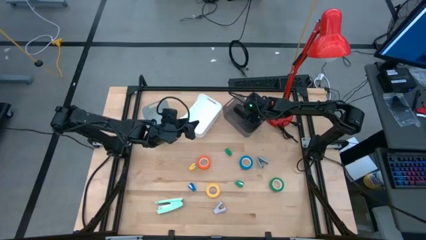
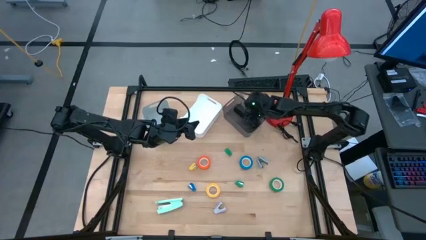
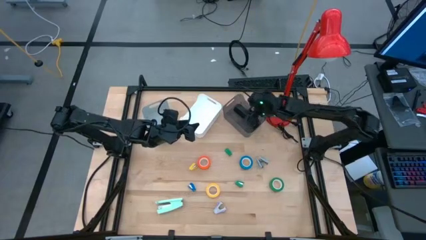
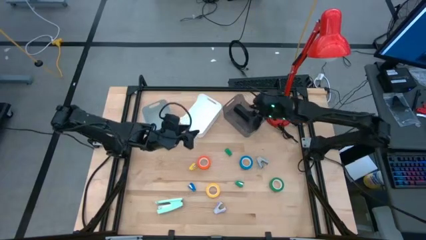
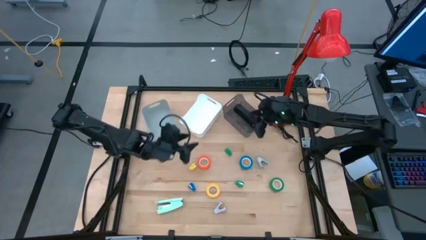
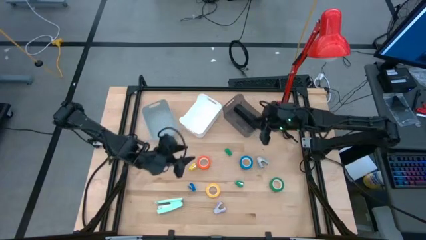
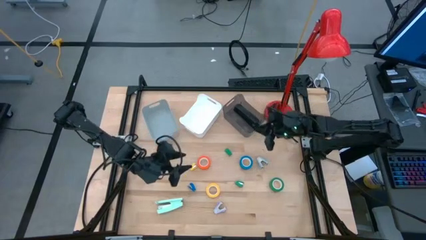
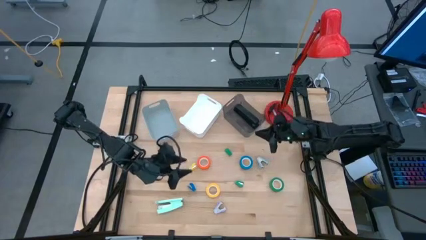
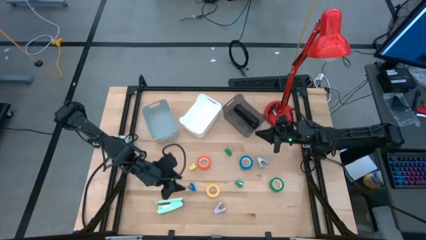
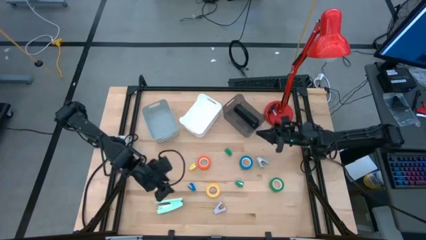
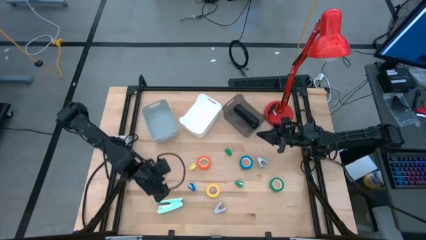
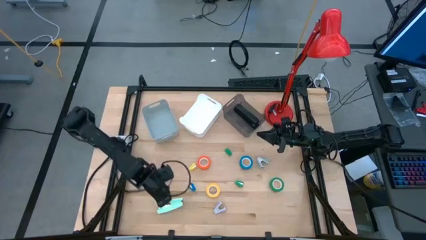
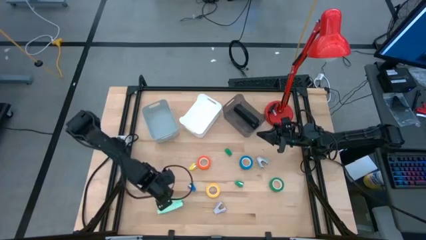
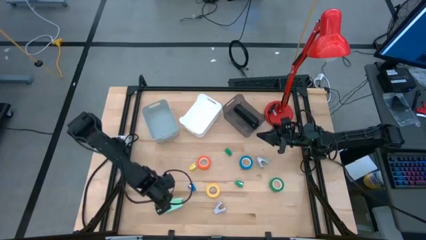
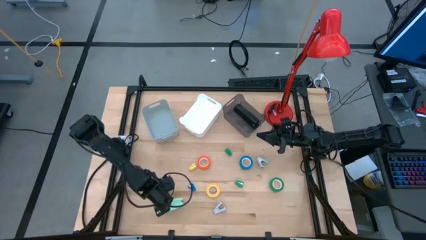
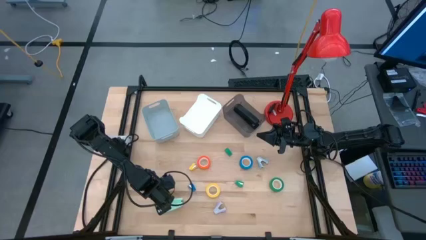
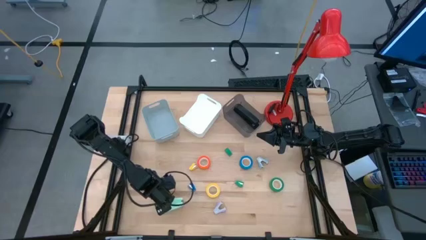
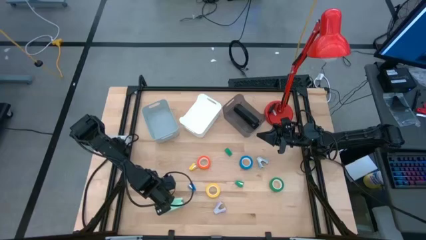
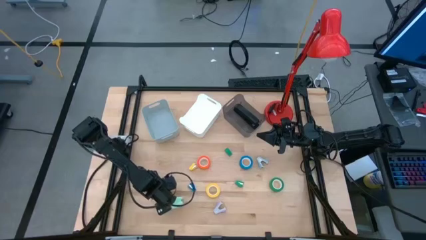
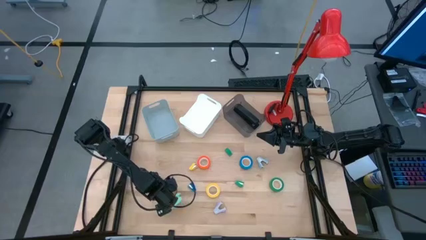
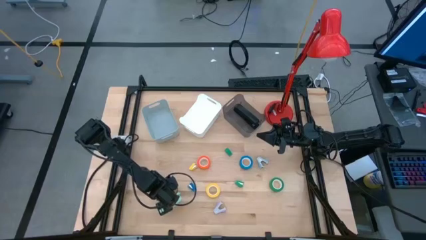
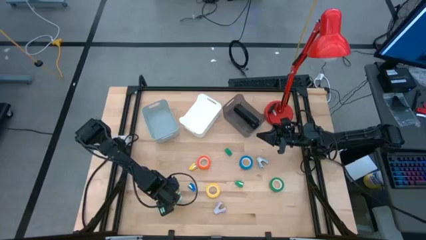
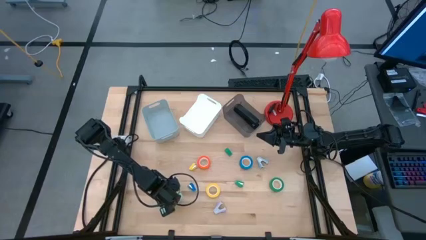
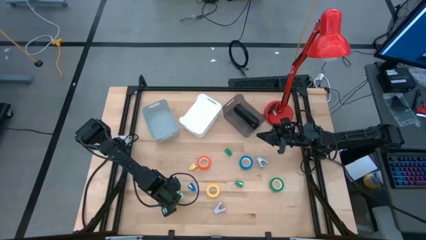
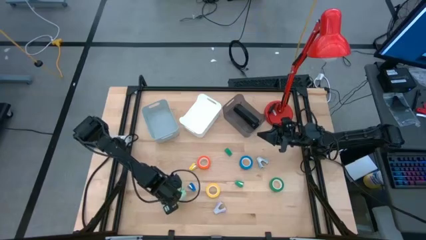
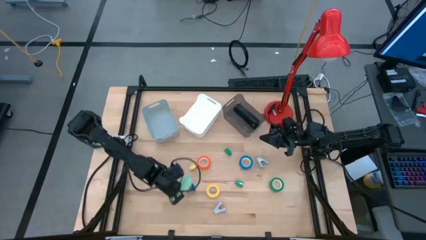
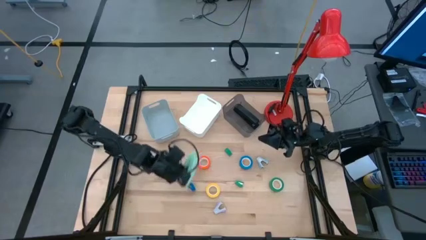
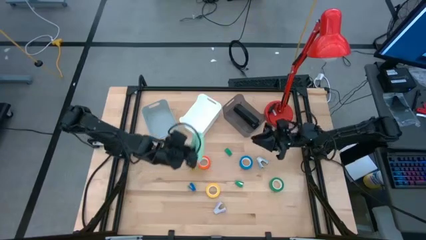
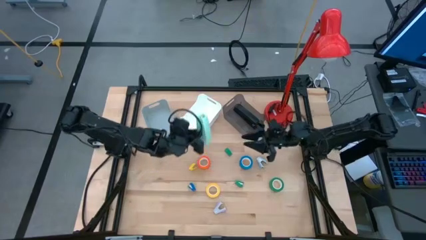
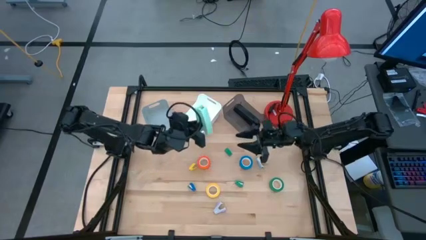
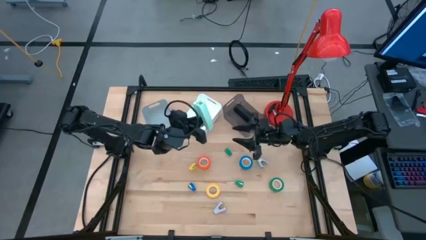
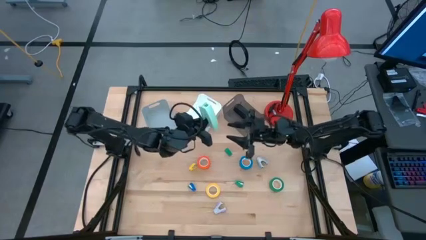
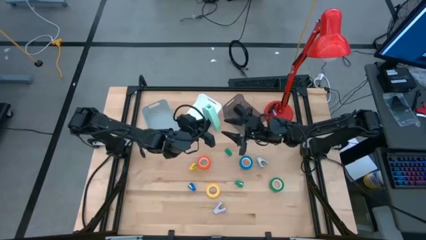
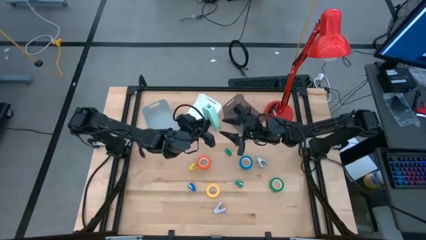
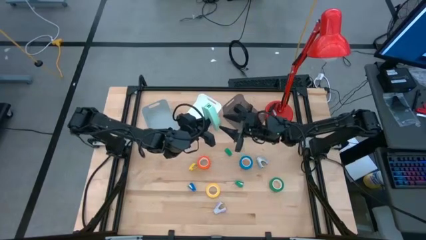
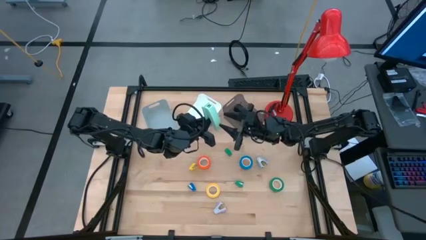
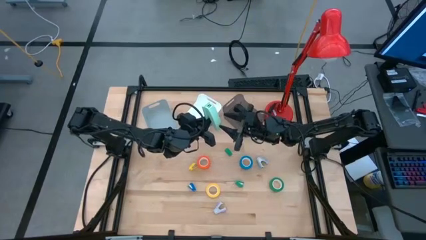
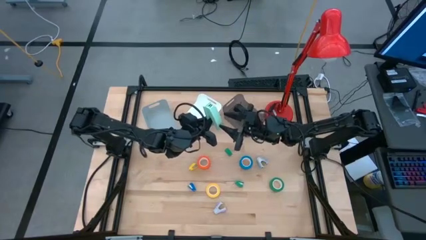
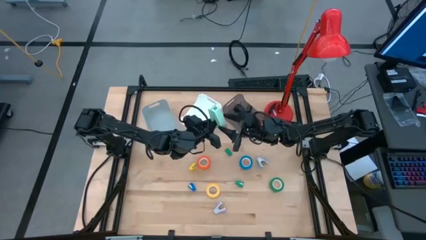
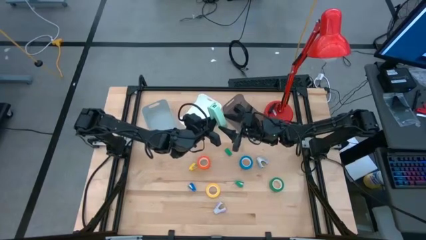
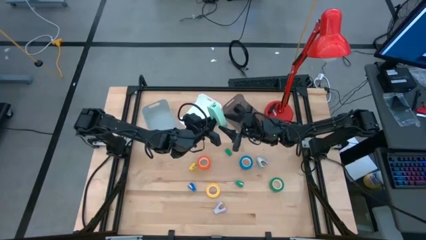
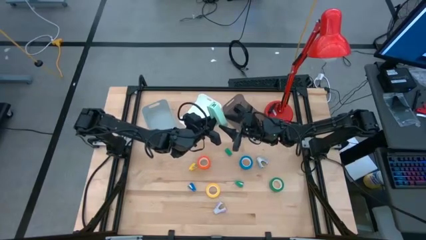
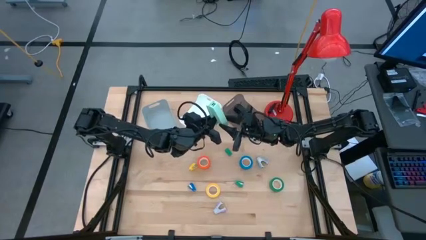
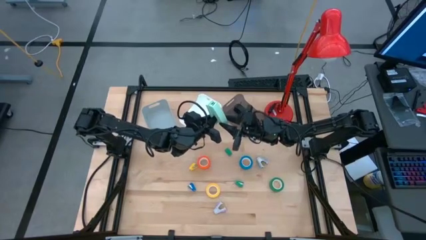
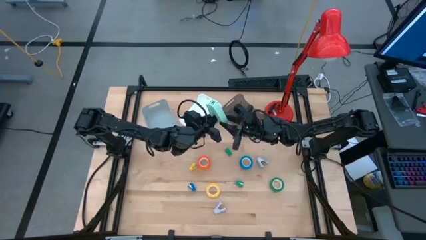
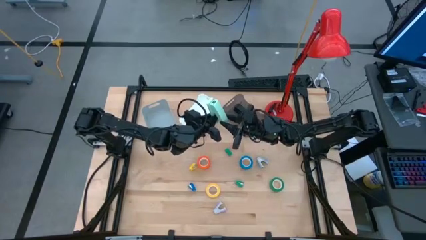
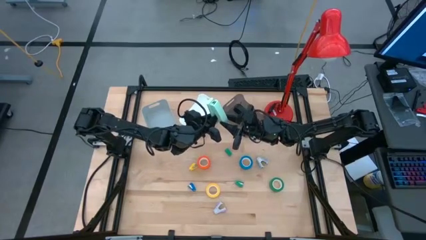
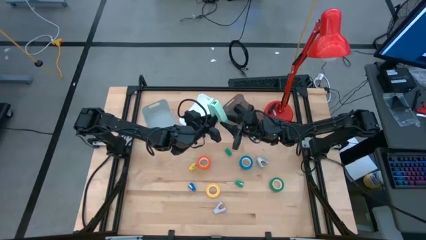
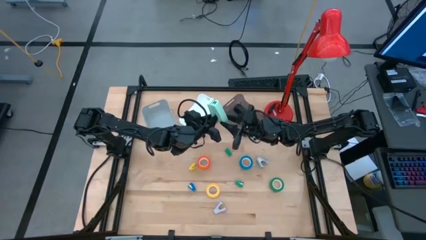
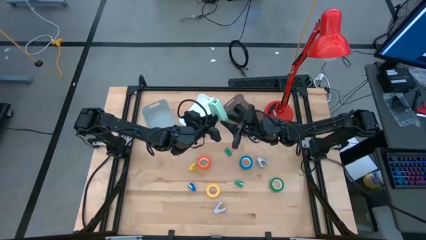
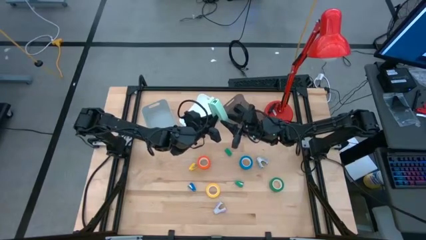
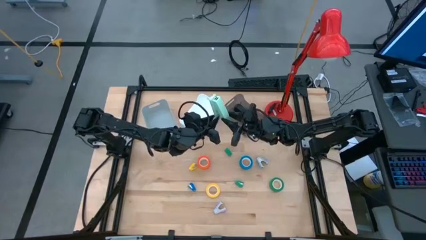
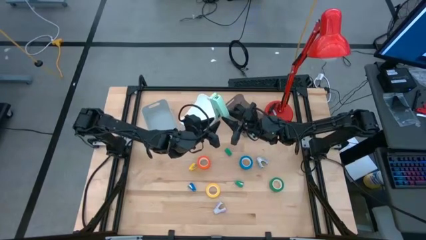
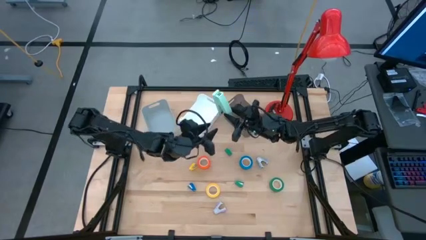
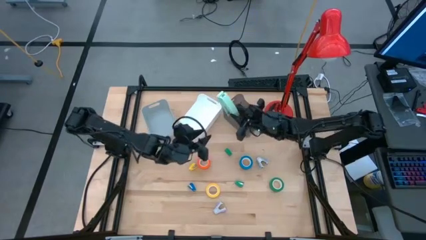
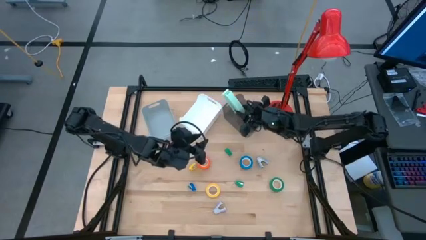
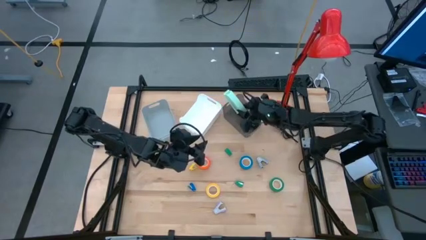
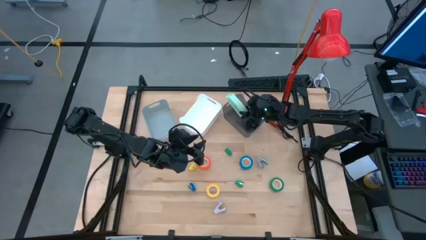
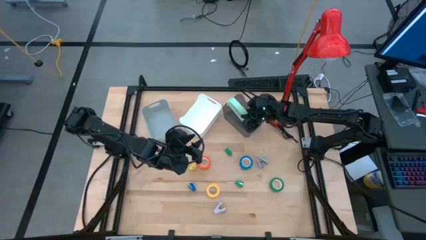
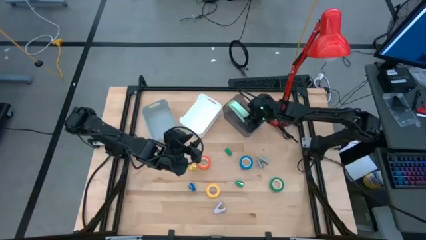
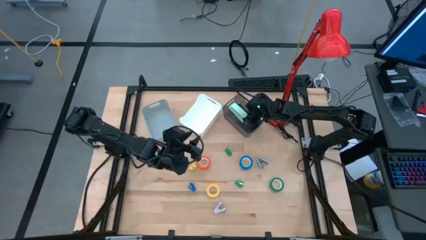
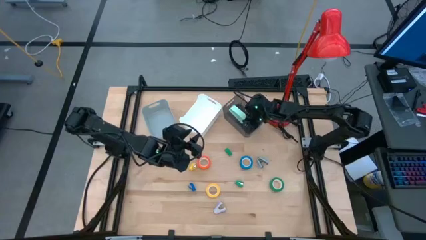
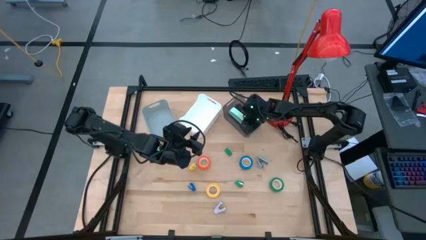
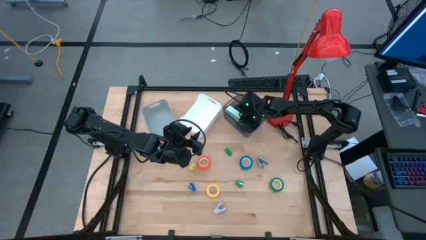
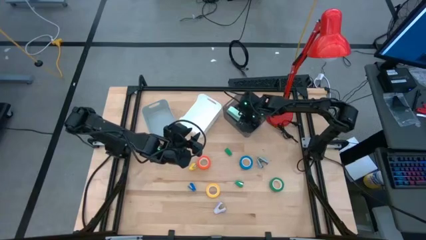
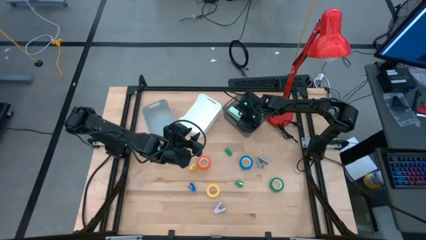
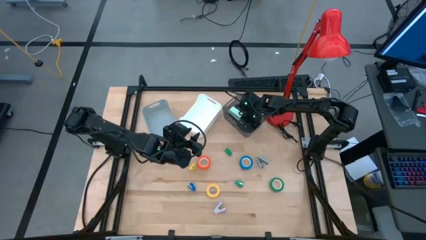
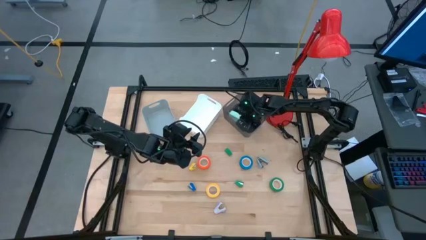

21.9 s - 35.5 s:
Task: Pick and place Stapler, Stapler remover, tape
Put the light green stapler into the black bin
